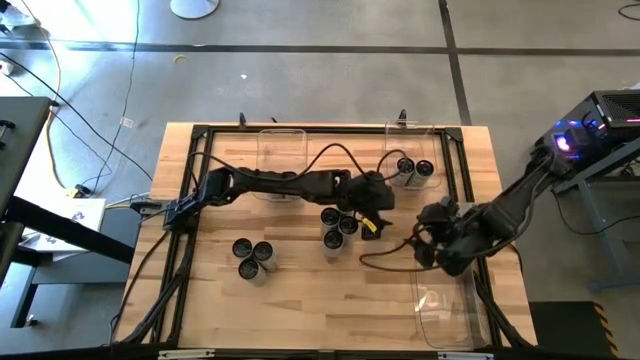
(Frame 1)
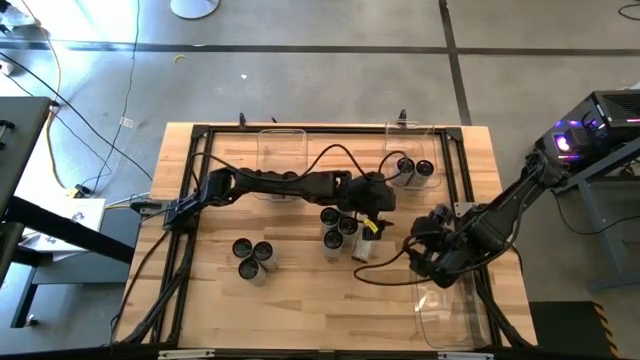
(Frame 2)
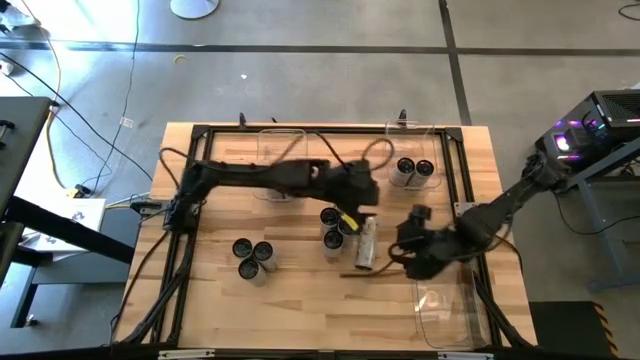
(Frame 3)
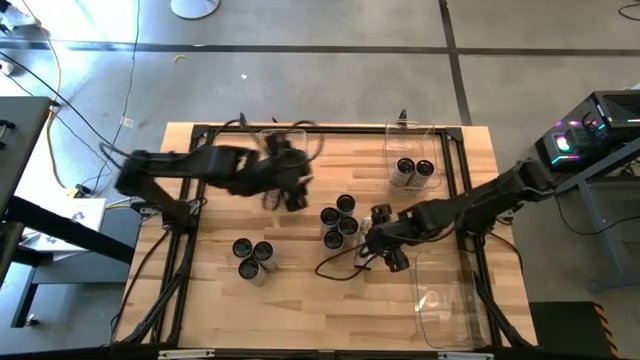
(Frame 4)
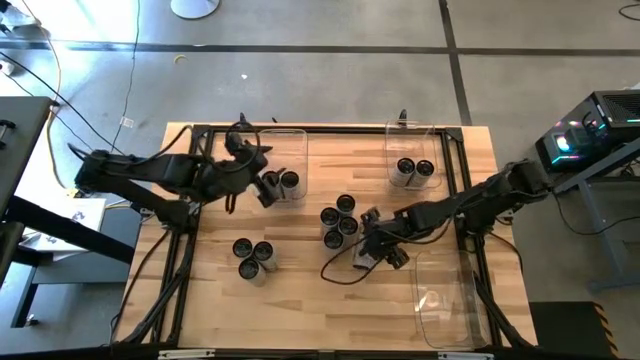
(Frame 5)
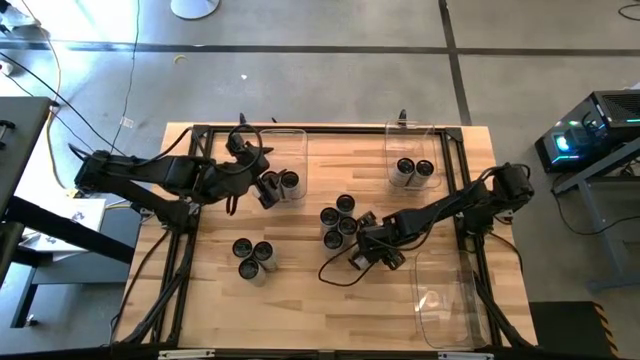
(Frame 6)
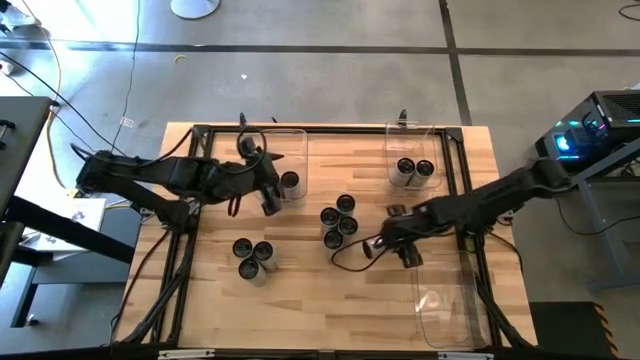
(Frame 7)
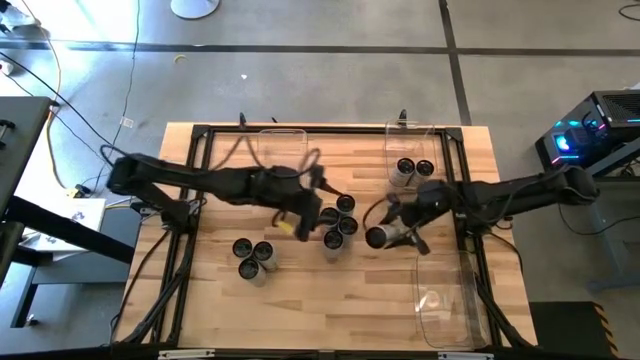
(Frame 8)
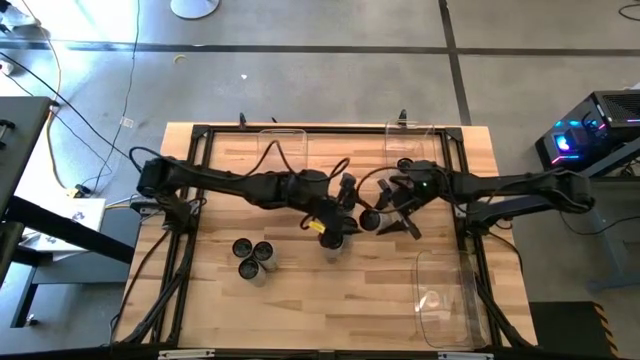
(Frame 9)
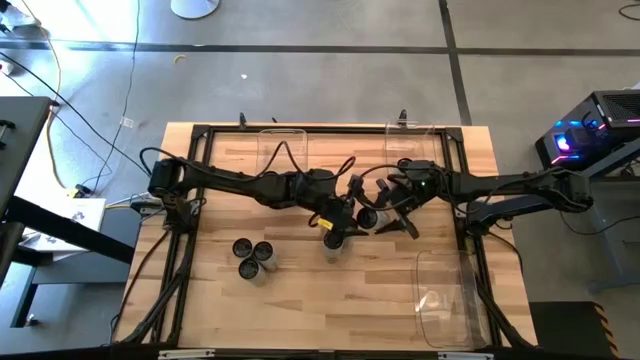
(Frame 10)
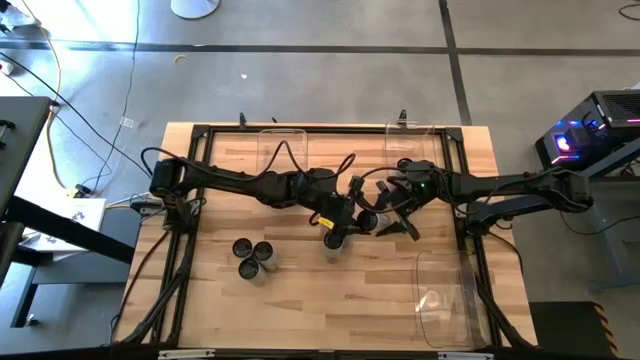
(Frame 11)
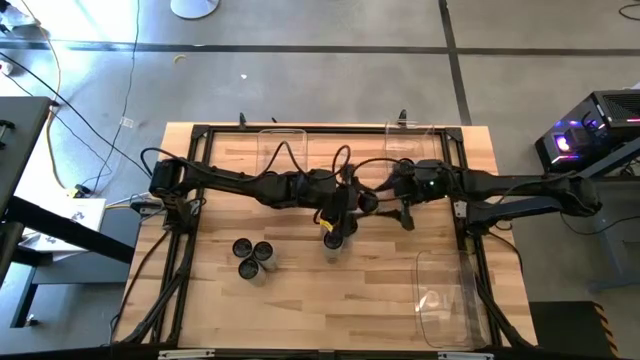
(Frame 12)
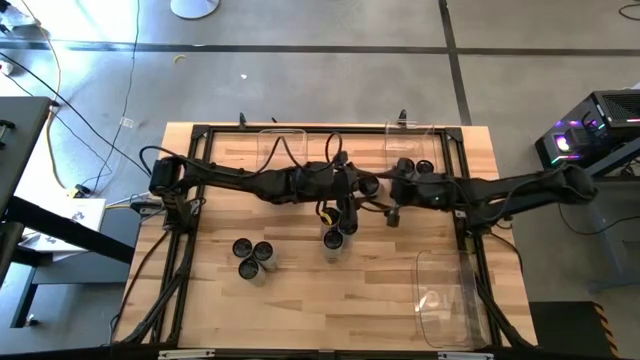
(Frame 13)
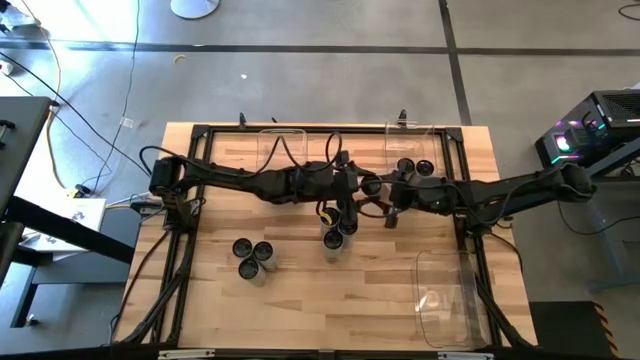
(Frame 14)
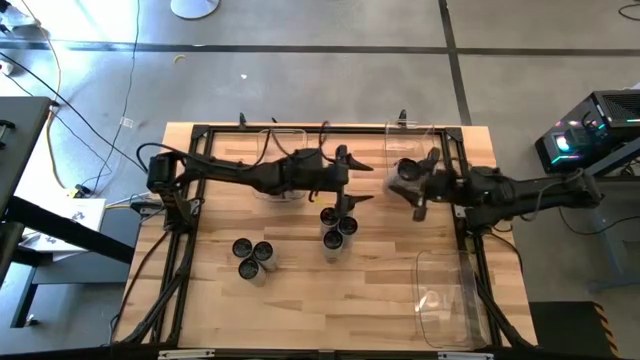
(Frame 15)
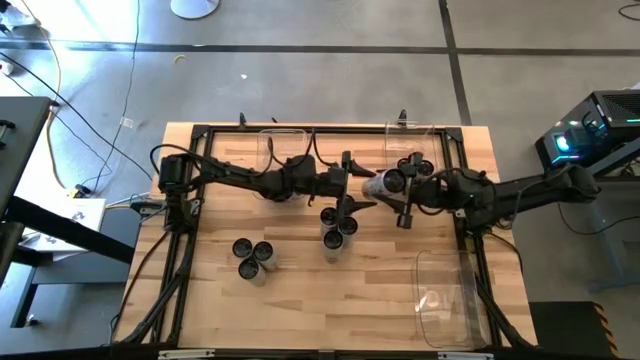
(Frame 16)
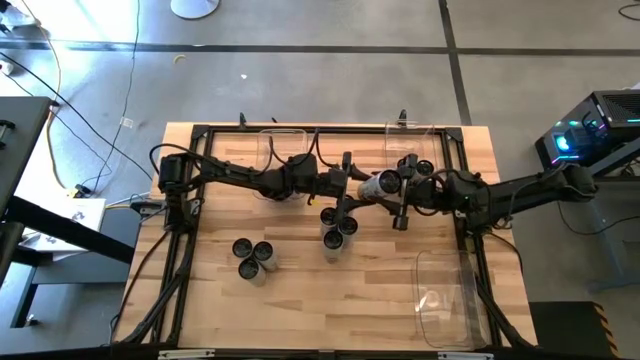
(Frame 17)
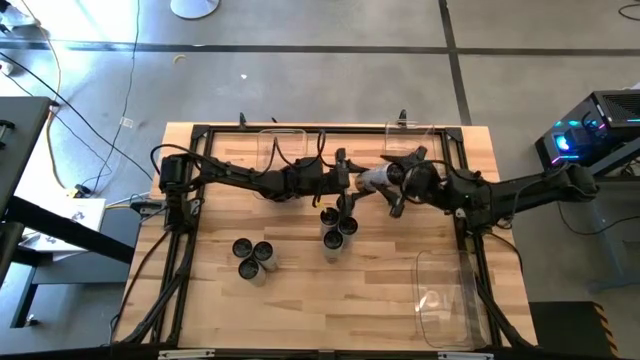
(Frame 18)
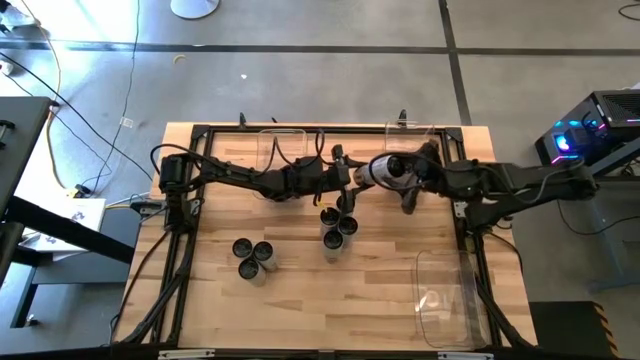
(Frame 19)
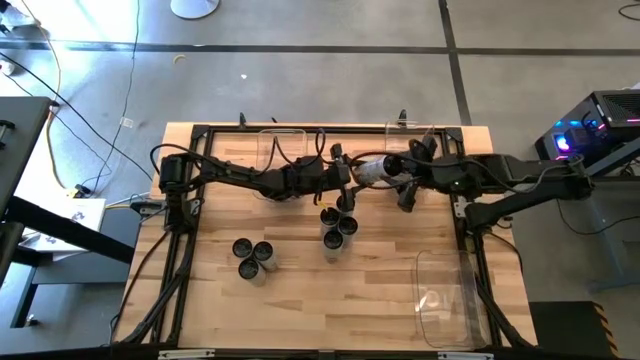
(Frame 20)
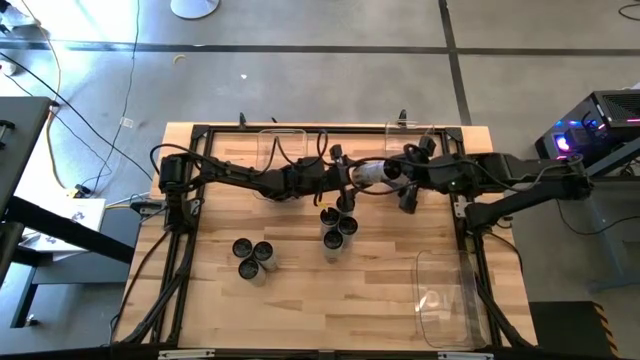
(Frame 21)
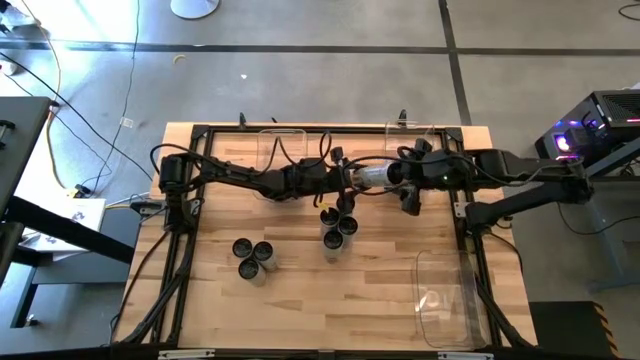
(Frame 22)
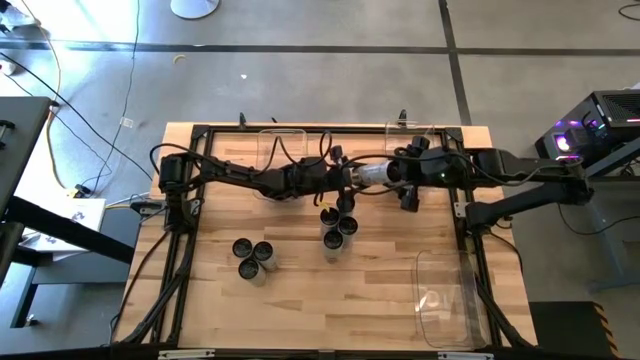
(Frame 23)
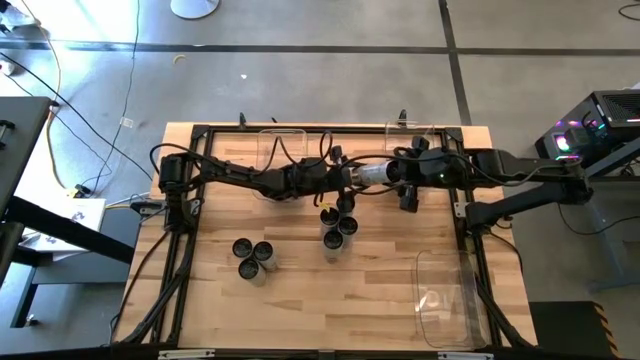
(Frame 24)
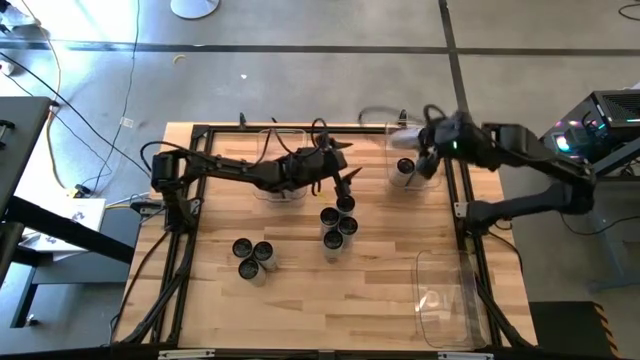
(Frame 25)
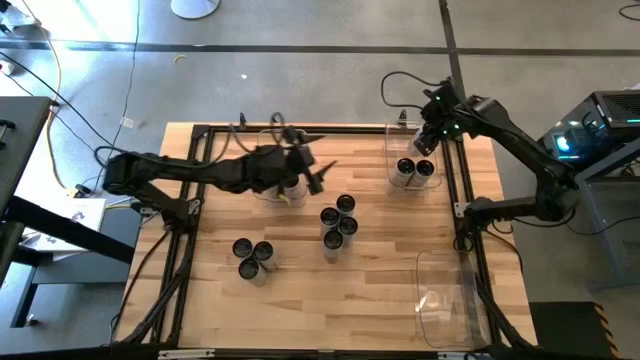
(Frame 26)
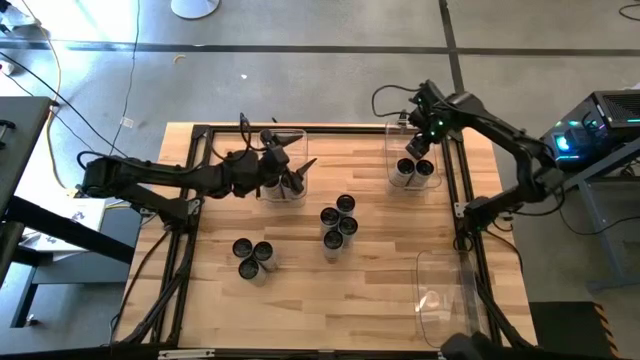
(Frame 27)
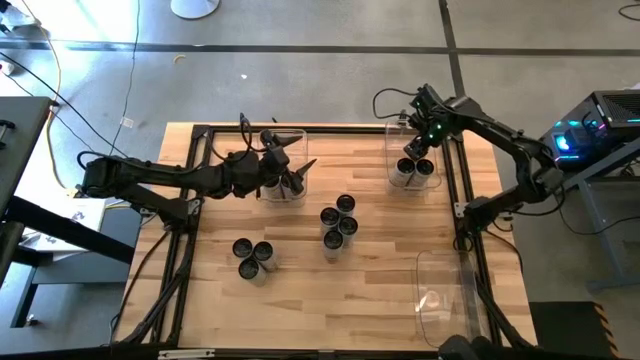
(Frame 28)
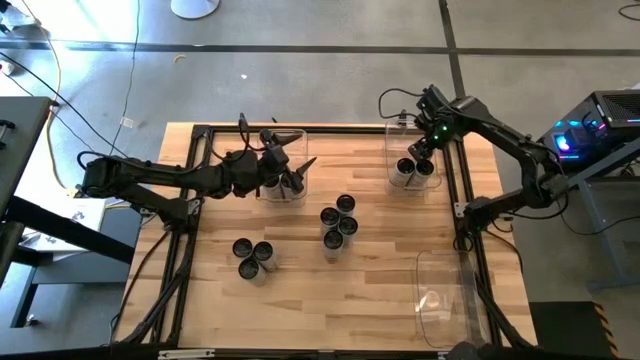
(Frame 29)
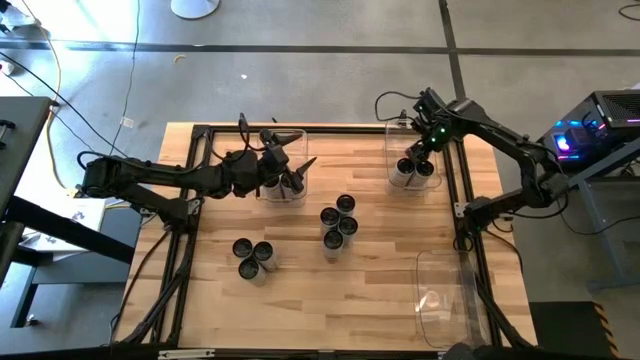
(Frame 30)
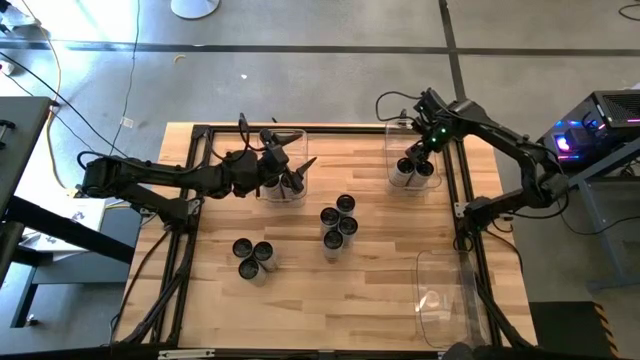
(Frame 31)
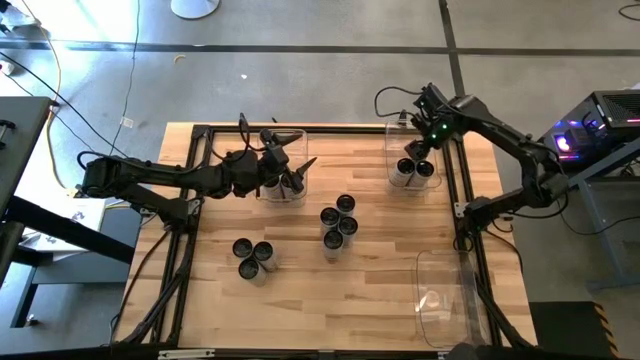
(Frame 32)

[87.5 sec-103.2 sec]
Task: Sort soda cans
Put the white-yellow soda can into the top right transparent bin

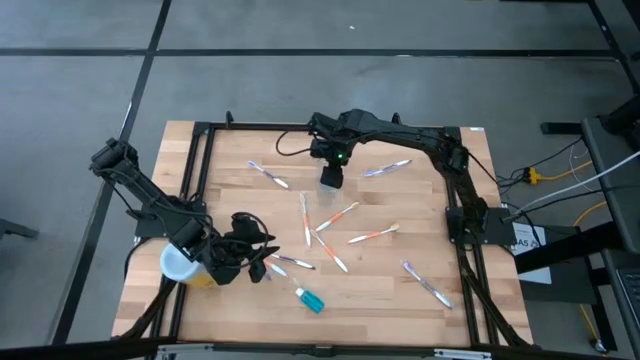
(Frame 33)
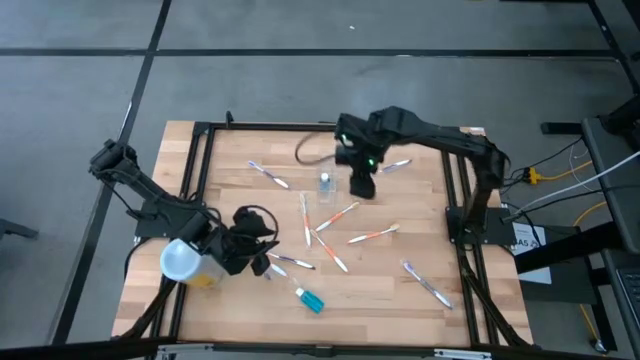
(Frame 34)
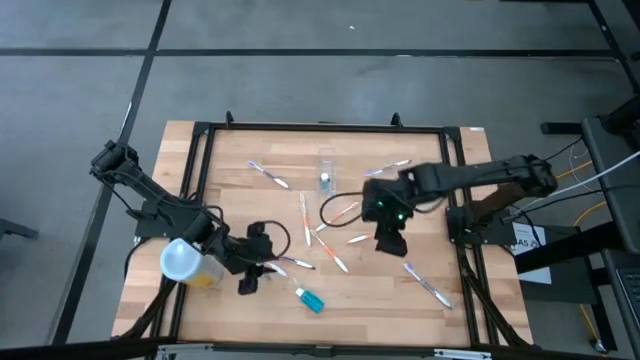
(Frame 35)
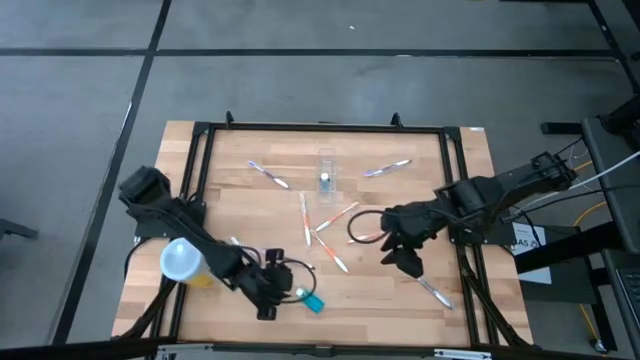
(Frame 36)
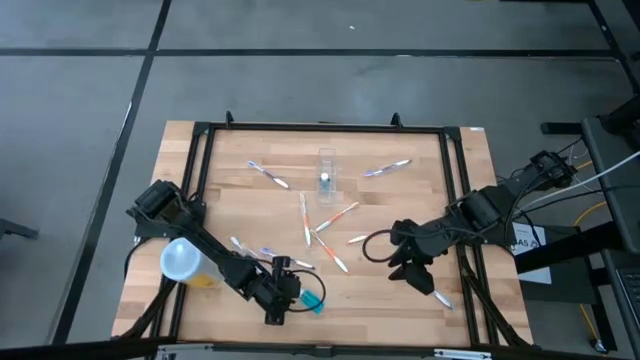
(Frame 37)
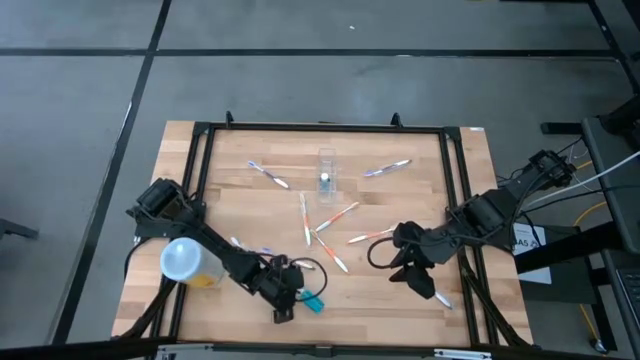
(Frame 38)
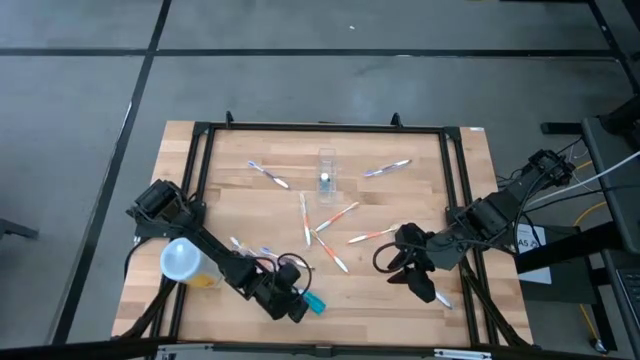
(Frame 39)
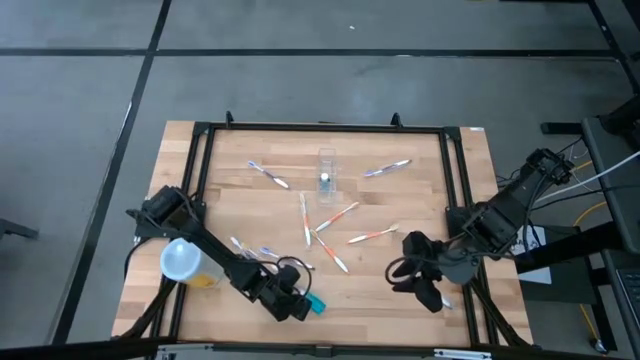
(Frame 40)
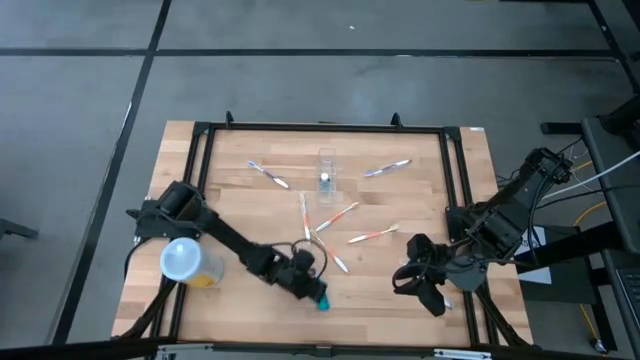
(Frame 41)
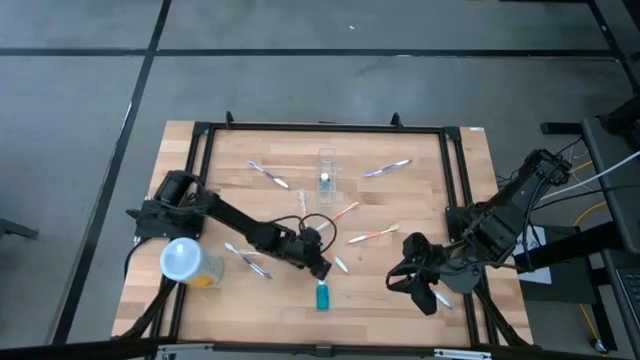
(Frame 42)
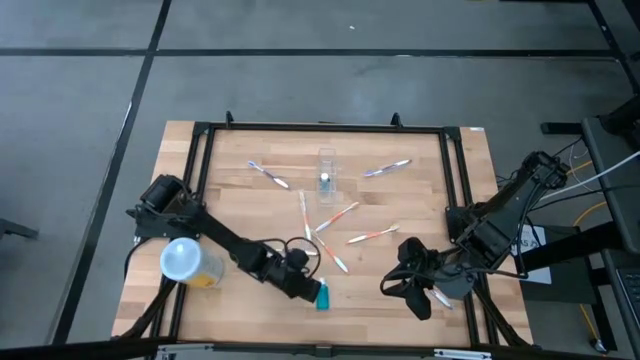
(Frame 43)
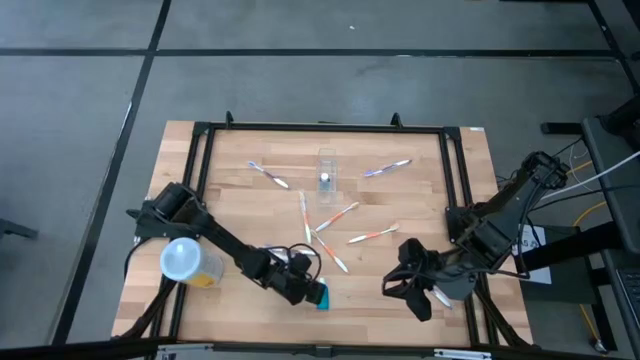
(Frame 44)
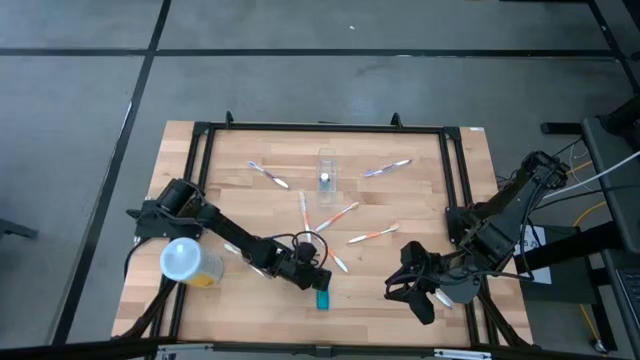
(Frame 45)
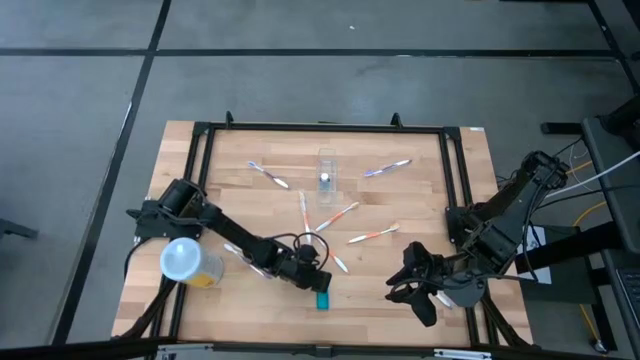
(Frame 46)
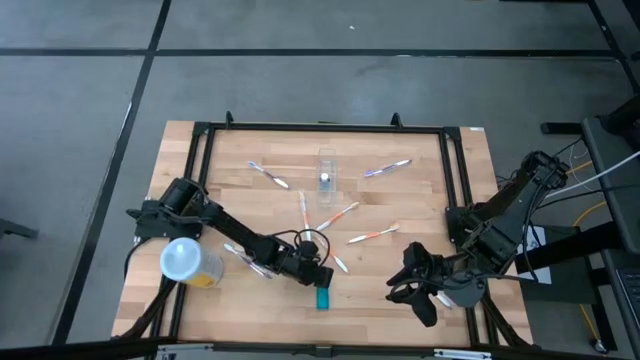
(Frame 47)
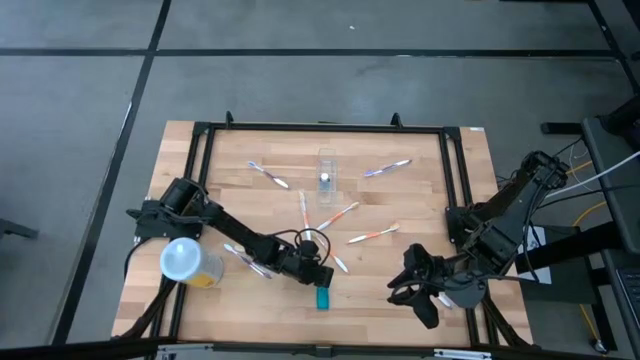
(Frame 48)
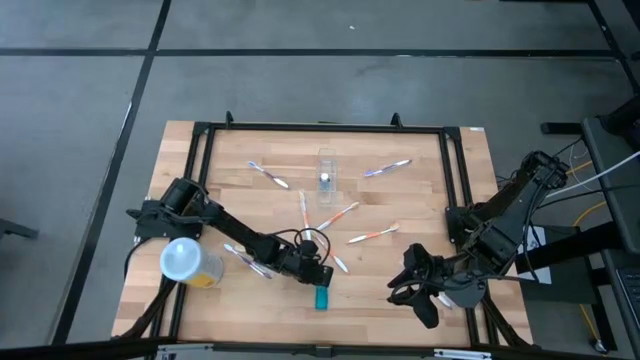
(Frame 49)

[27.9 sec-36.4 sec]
Task: Pick & Place toothbrushing station
Put the blue mouthwash into the transparent organizer
